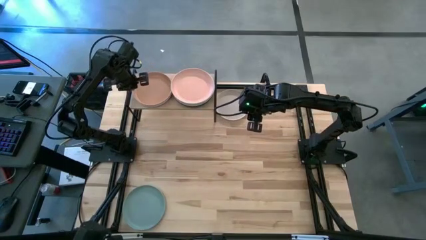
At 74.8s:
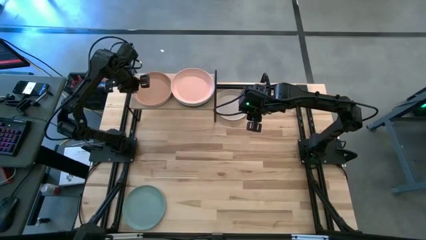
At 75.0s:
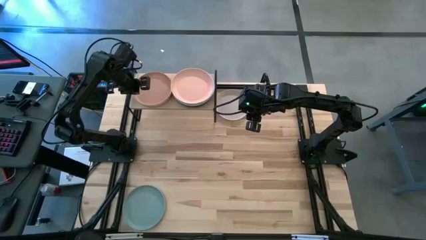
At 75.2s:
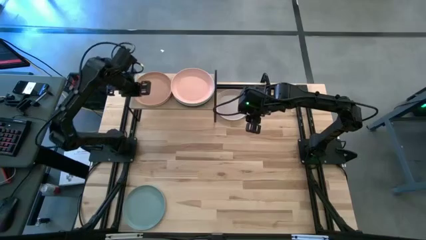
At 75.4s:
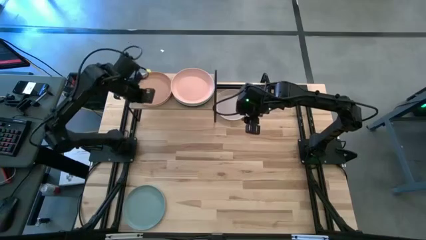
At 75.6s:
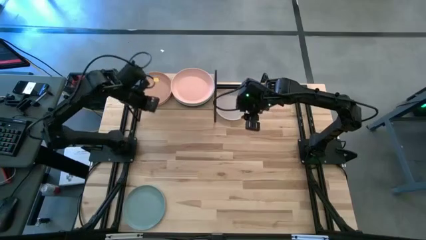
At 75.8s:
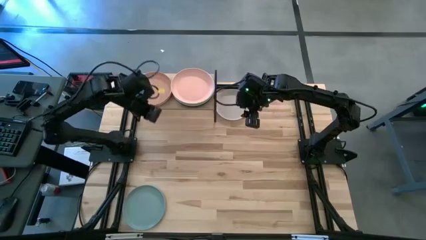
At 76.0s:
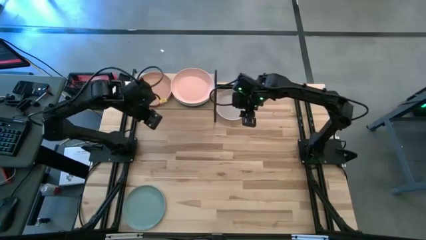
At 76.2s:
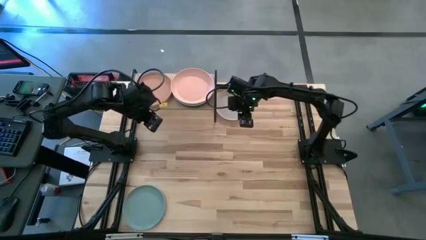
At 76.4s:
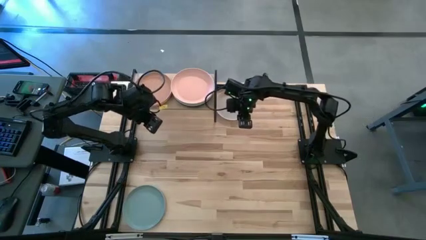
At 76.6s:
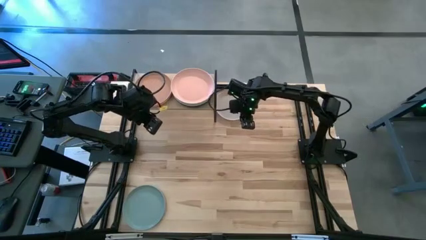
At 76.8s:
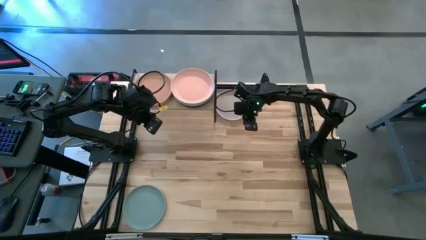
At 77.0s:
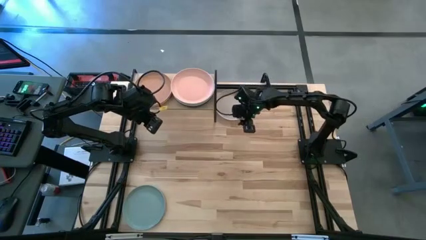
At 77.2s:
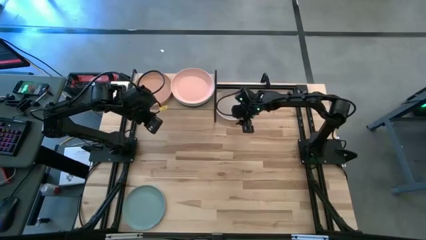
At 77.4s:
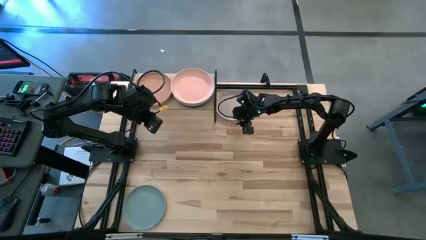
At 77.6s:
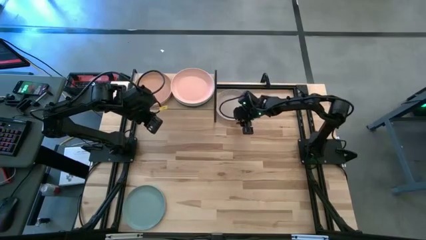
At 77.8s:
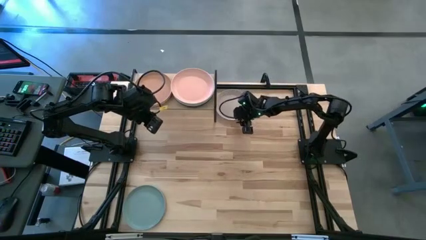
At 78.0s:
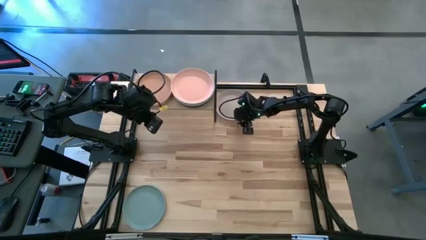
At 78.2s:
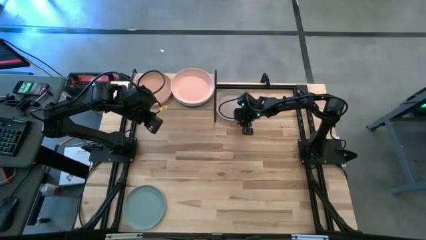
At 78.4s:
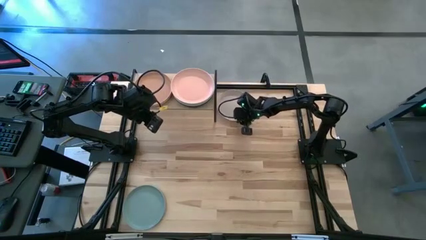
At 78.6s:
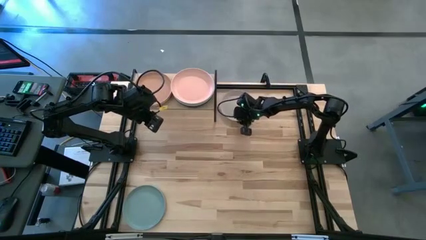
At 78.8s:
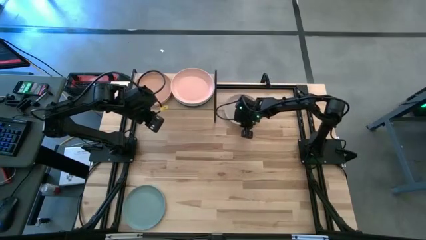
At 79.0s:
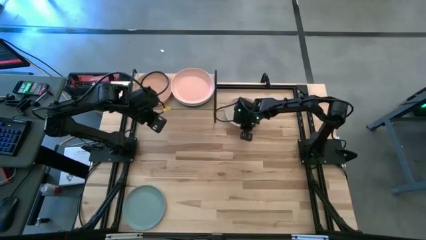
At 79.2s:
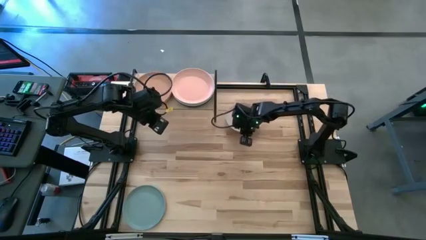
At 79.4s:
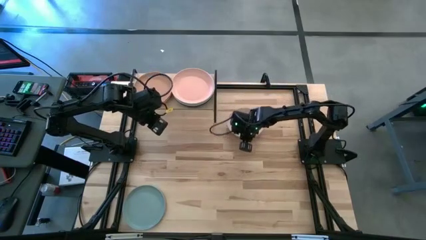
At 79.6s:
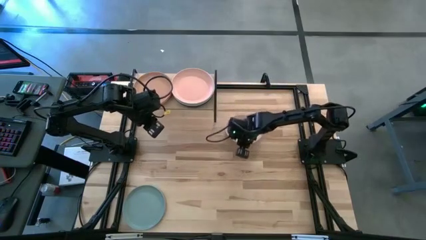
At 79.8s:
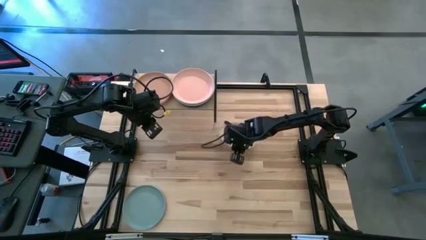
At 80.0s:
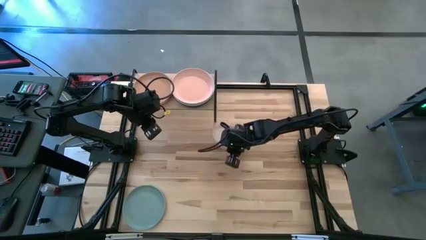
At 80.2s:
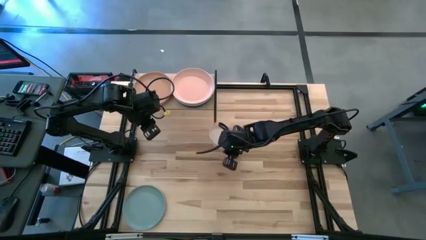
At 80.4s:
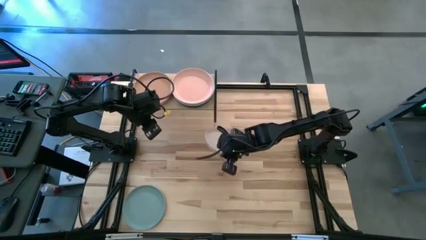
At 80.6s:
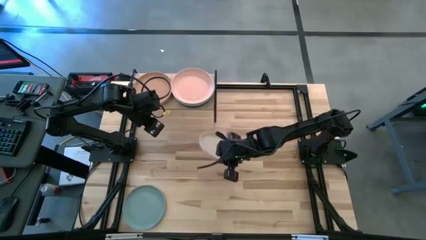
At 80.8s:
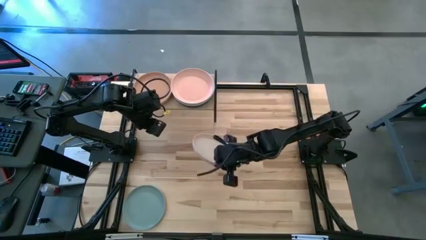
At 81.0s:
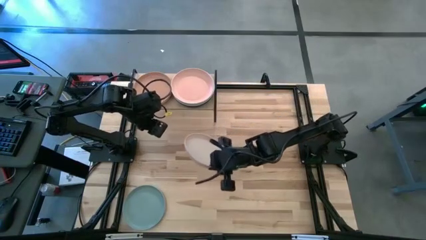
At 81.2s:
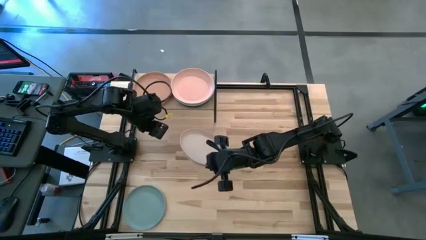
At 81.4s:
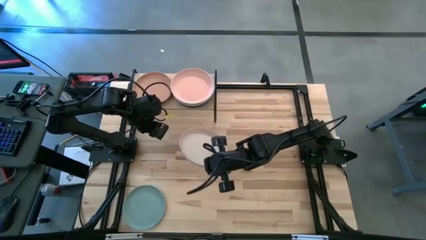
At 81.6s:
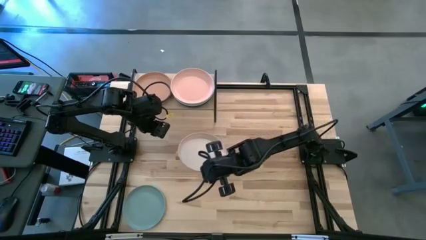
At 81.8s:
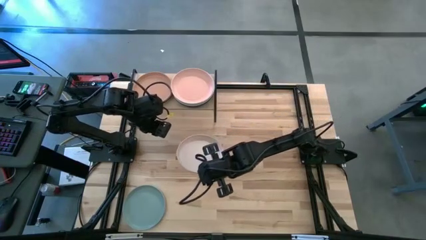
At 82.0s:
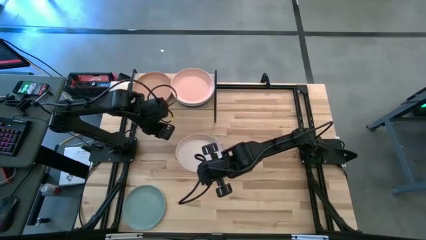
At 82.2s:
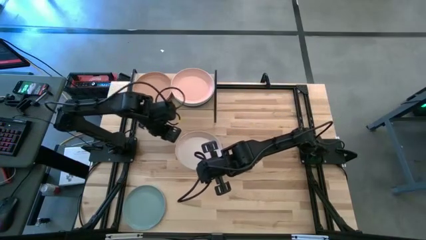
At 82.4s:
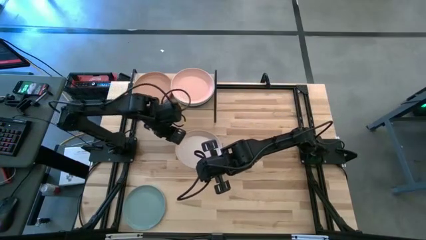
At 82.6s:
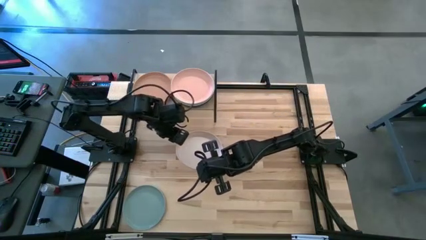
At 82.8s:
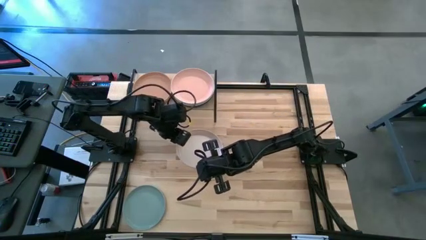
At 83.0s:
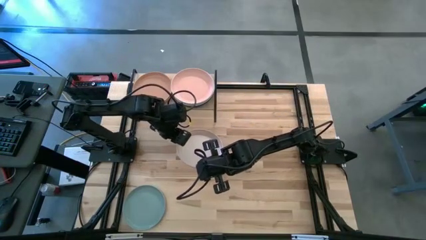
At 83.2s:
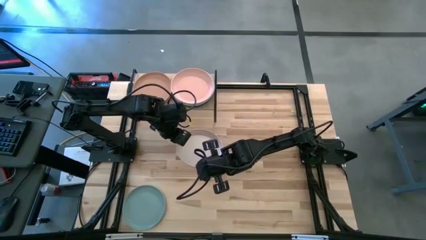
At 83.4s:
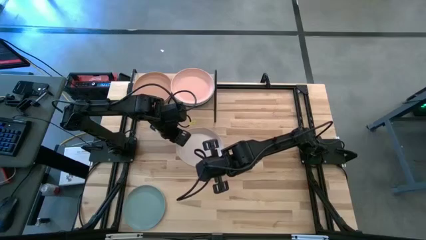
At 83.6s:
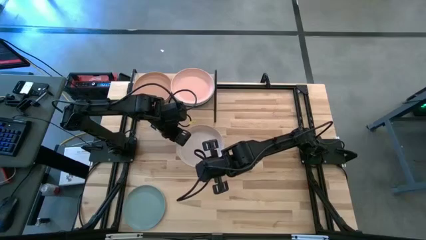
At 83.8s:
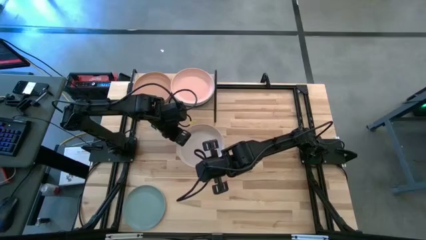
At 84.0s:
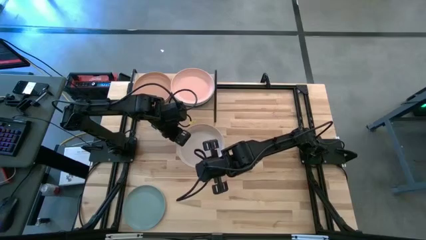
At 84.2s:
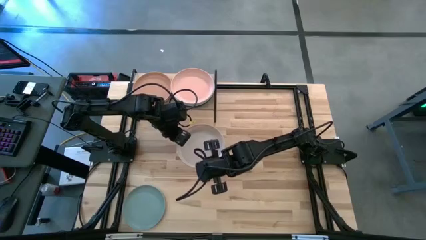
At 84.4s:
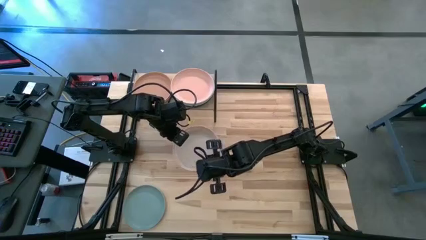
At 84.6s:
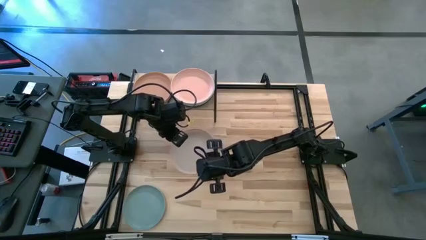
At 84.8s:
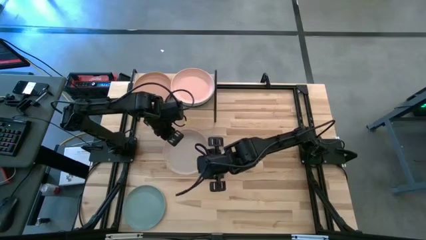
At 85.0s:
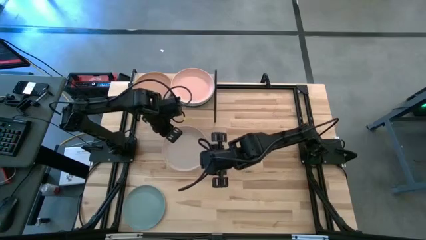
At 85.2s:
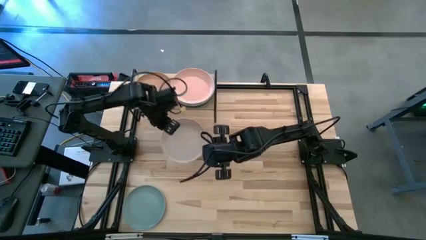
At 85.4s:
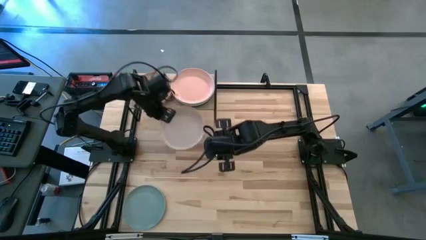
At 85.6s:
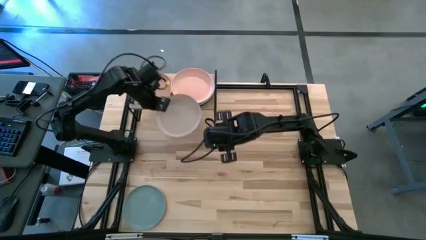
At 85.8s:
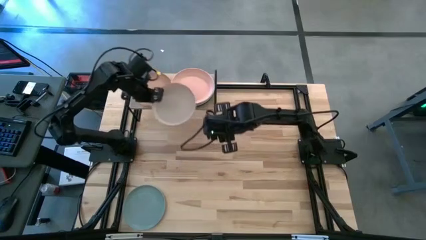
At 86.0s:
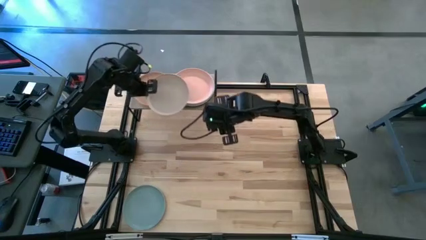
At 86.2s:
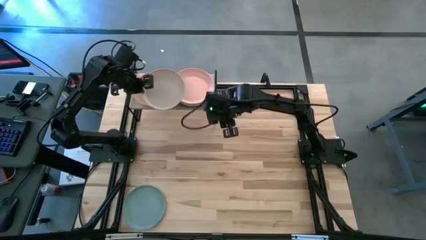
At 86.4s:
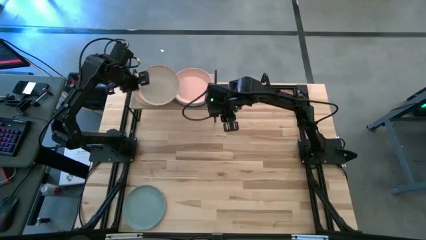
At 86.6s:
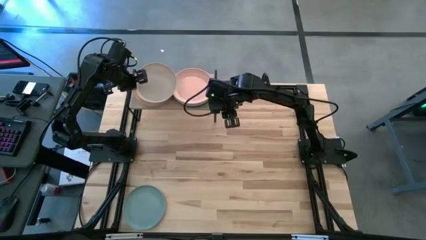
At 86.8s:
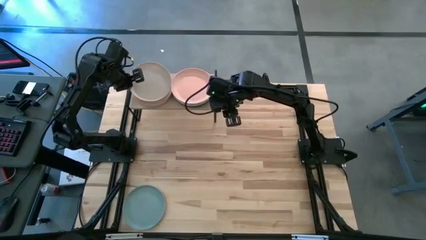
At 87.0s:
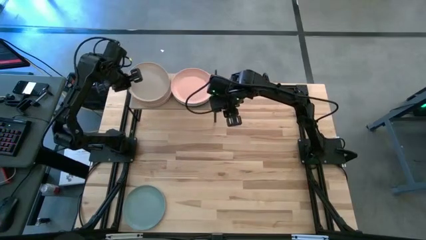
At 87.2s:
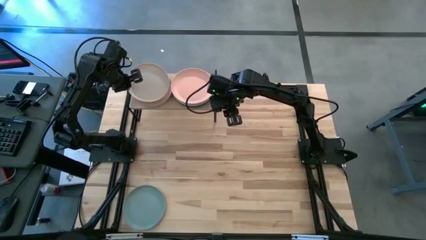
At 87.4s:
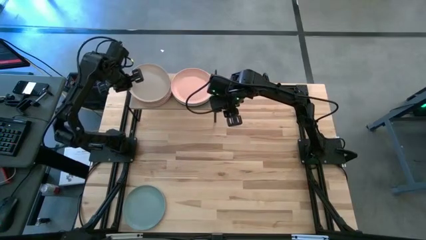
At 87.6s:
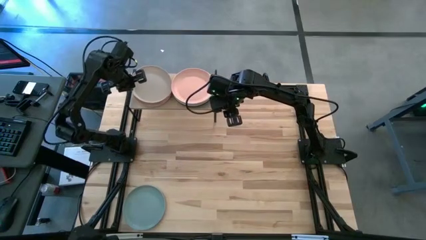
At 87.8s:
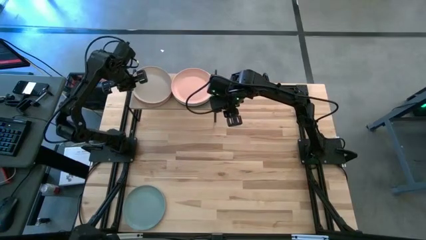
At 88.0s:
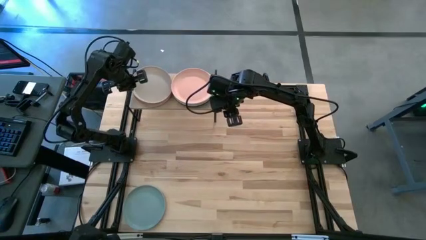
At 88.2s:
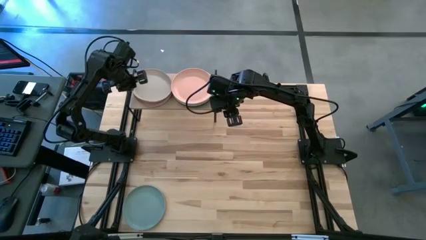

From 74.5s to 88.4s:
Task: Place and stack plates onto a shelf
Stack the white plate on top of the pink plate on the shelf

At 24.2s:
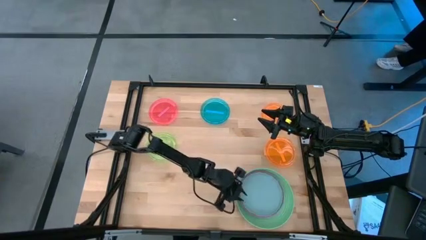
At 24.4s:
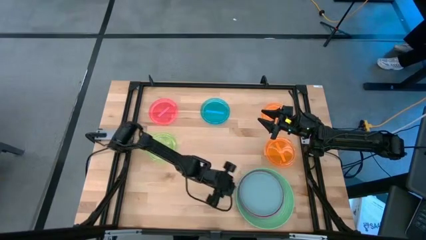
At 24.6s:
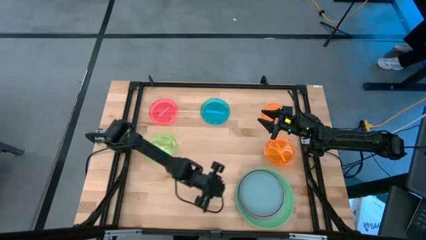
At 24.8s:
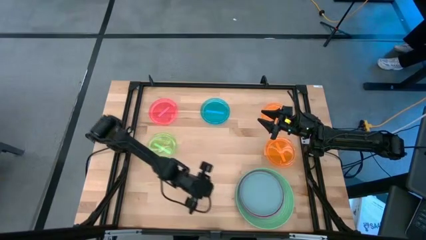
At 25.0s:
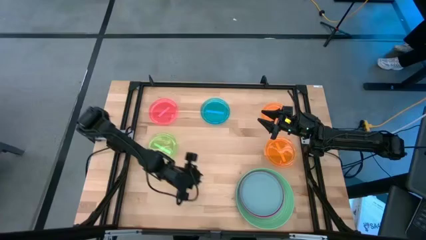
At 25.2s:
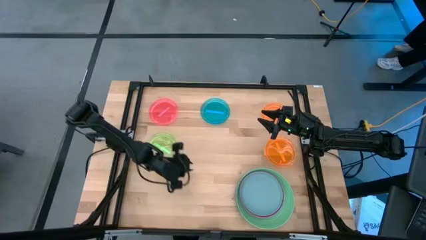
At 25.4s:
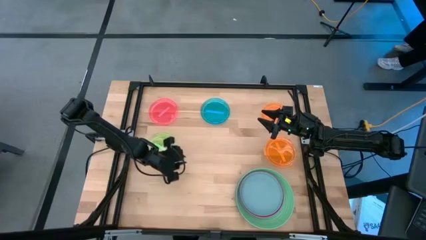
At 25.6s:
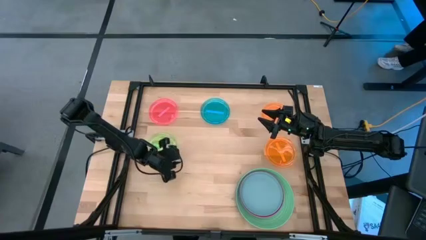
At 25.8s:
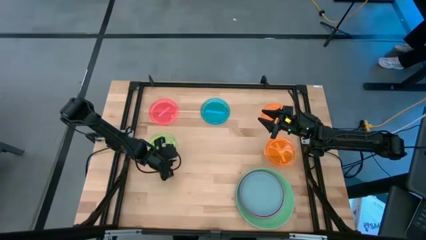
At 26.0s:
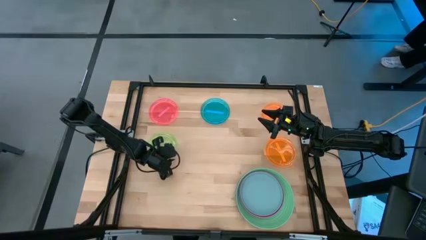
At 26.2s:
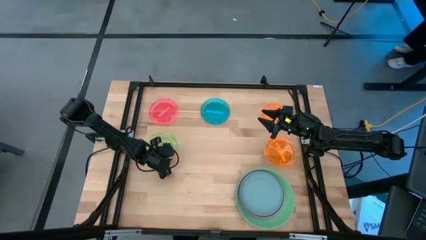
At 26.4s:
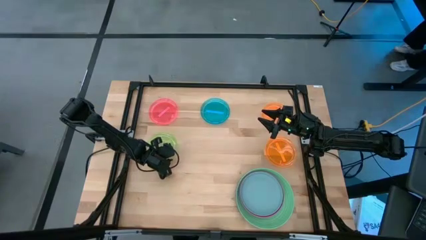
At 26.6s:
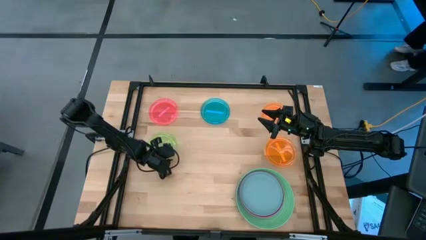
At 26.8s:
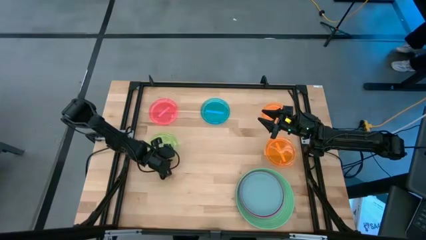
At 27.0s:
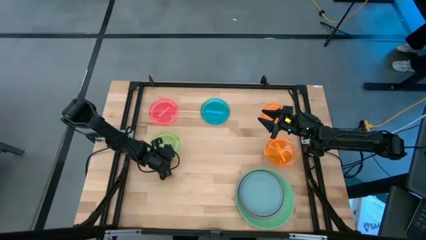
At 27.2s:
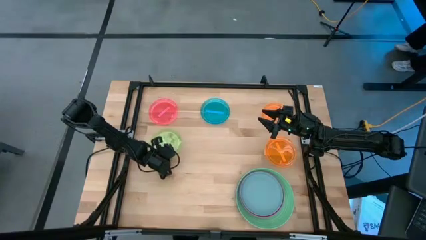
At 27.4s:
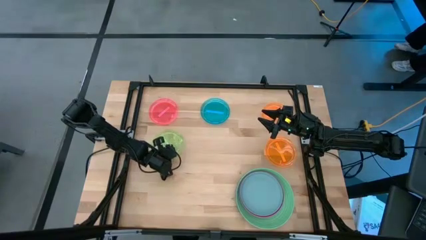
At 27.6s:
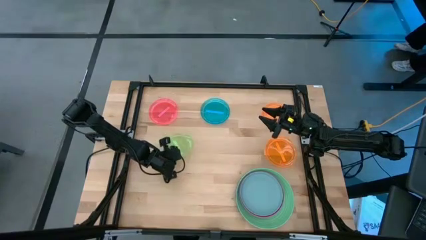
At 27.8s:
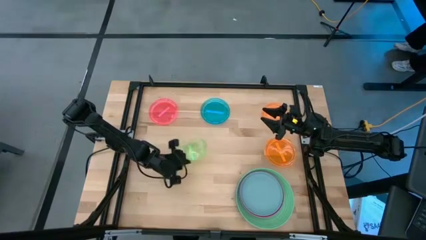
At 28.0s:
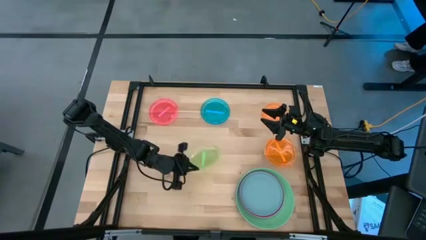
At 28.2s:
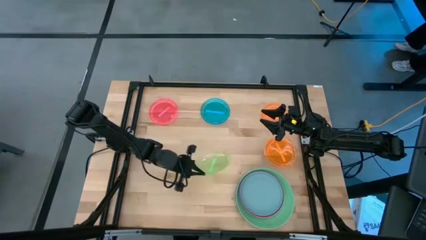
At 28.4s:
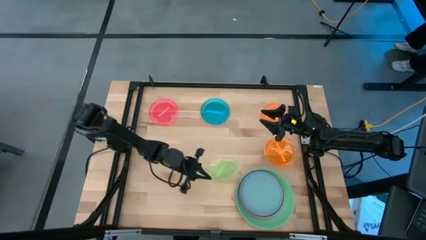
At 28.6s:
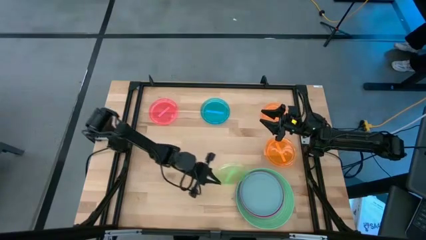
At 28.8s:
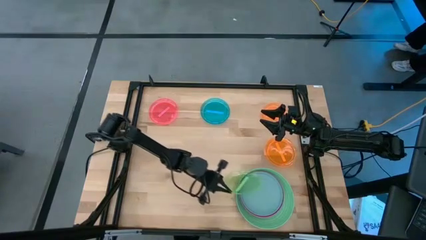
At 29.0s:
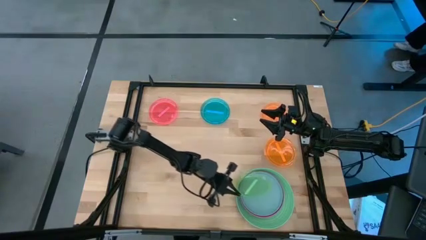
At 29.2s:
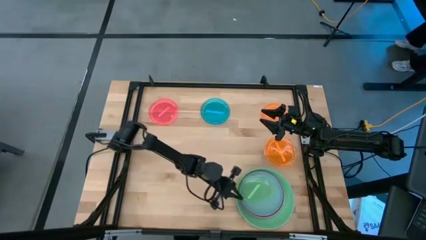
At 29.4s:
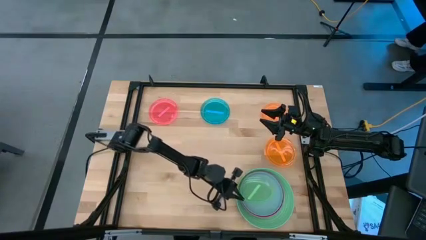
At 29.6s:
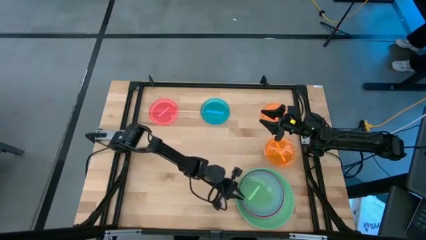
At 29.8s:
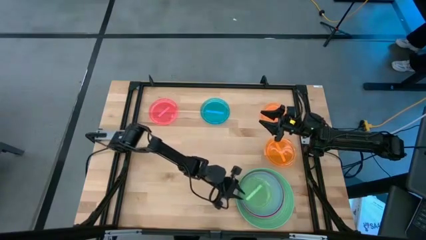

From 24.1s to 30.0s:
Task: Stack plastic plates
Stack the green plate on top of the light blue plate
